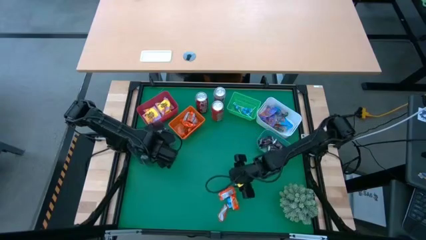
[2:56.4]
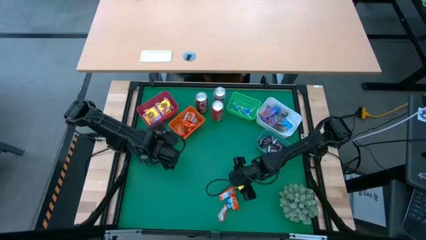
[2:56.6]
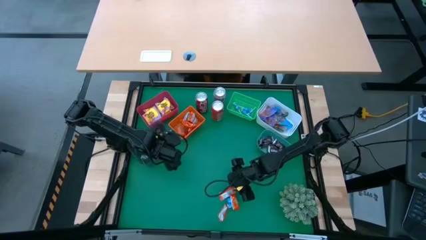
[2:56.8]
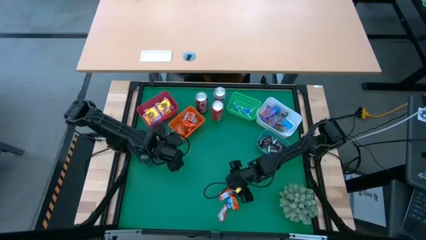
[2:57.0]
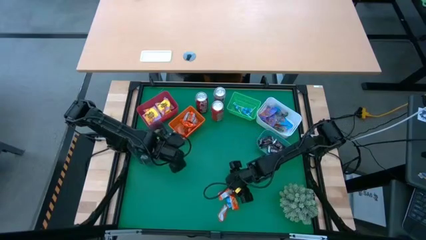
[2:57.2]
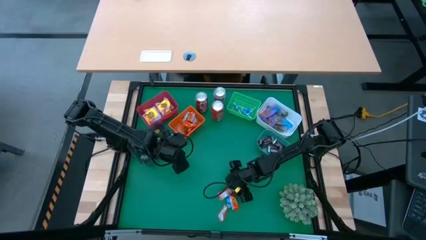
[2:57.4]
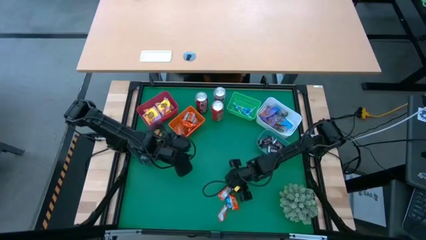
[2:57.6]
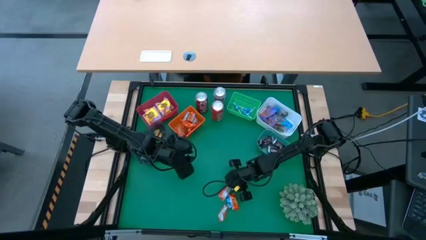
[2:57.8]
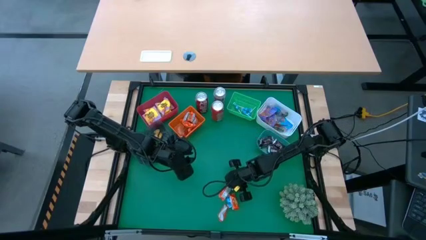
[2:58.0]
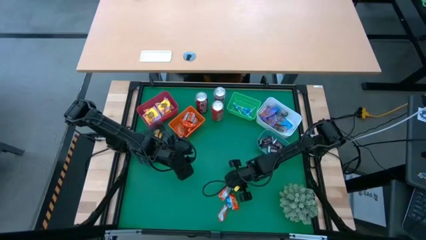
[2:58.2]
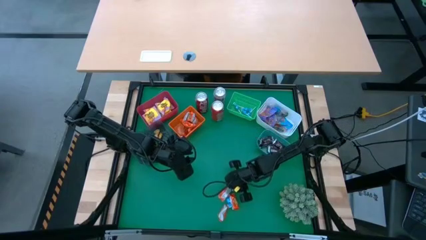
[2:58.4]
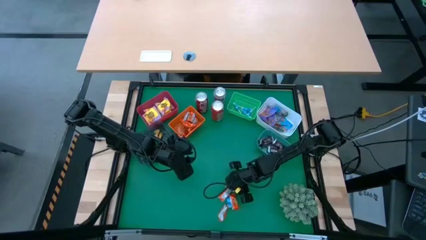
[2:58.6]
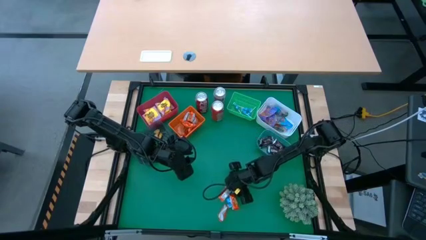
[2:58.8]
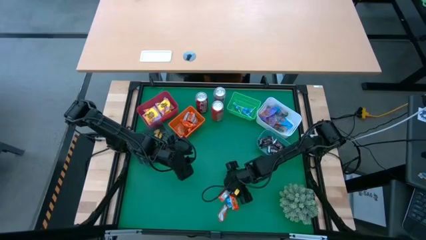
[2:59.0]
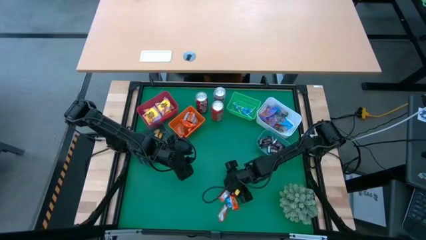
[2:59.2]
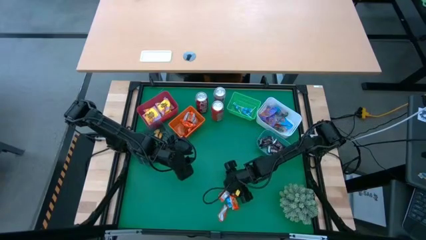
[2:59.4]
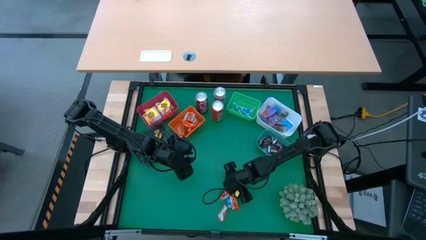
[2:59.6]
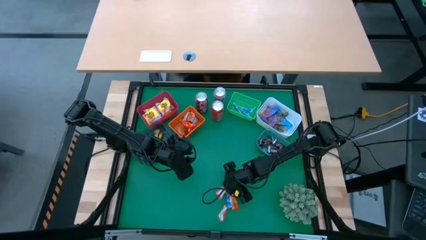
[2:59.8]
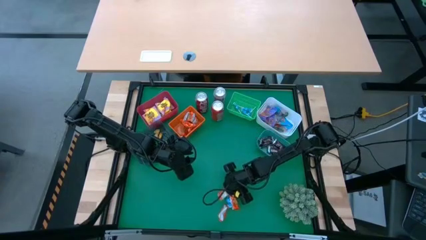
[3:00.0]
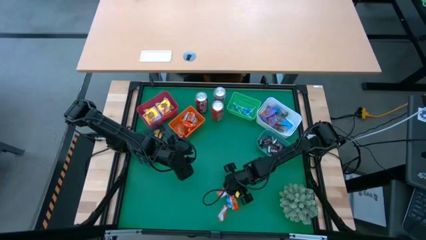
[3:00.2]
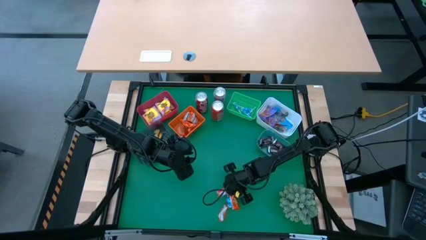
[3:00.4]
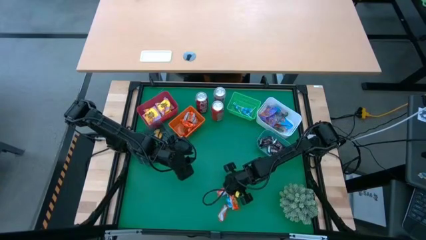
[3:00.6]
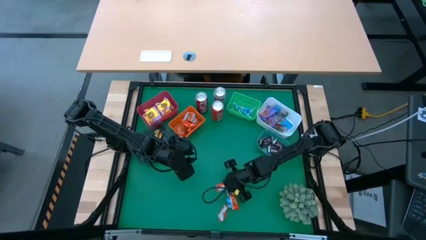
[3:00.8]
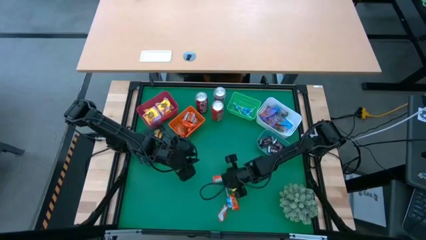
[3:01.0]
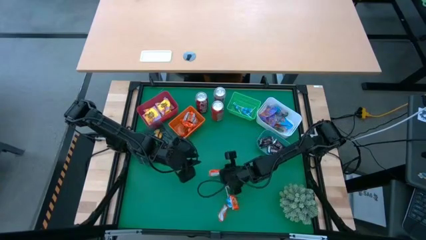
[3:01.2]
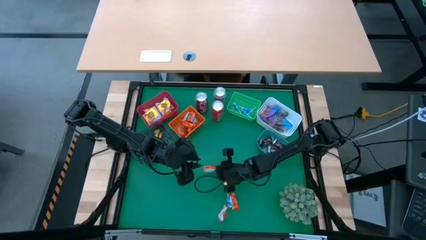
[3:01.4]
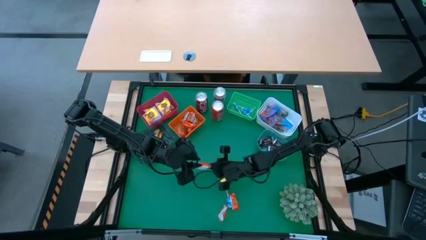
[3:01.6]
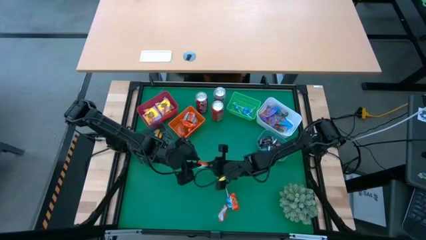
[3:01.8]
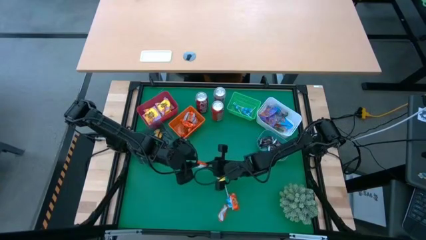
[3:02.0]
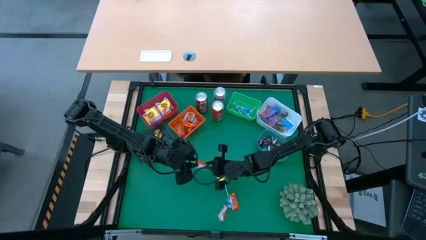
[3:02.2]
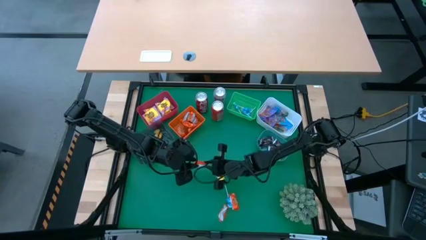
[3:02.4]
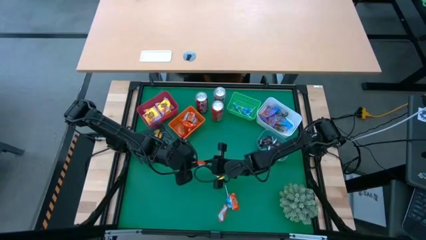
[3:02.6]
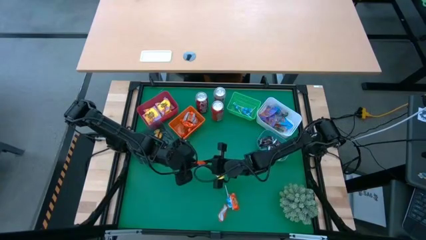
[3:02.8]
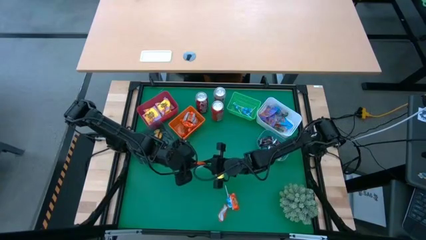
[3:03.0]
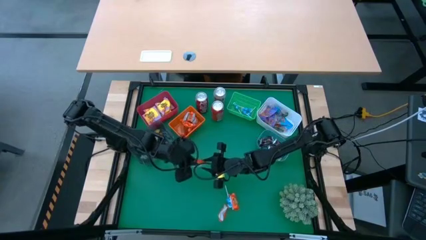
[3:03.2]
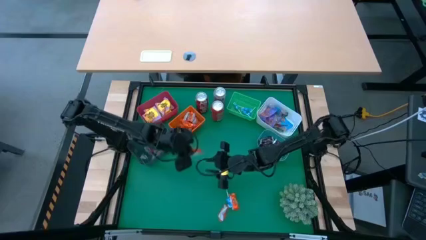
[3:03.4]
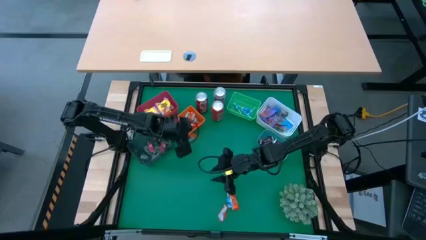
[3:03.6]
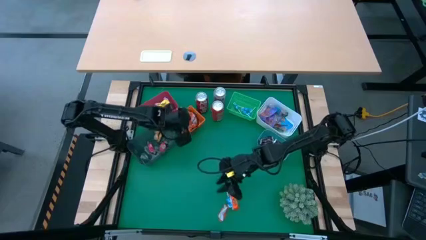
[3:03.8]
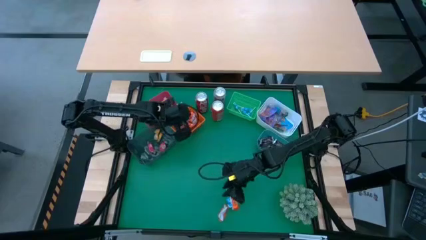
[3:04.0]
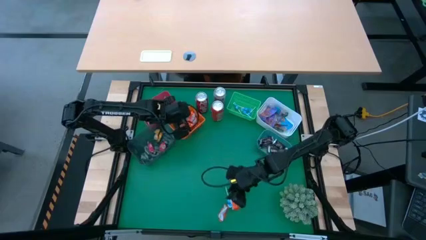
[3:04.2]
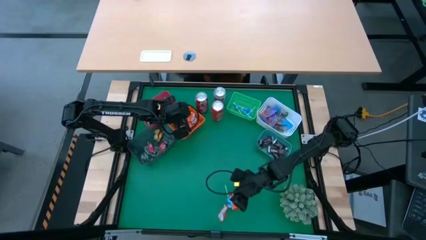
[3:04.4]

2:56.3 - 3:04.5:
Task: Sort candy
Put the orange chocolate into the orange bin

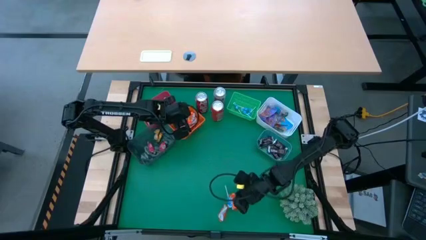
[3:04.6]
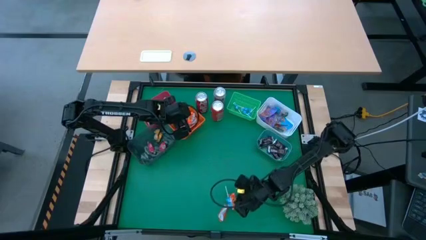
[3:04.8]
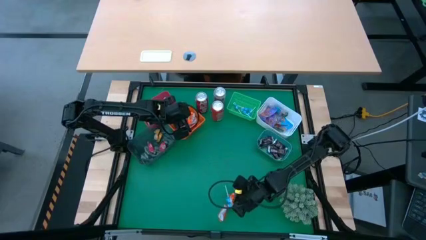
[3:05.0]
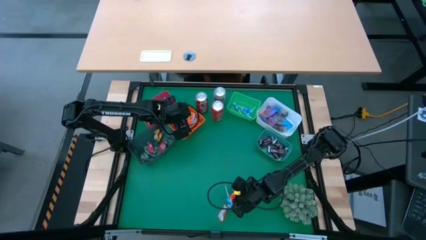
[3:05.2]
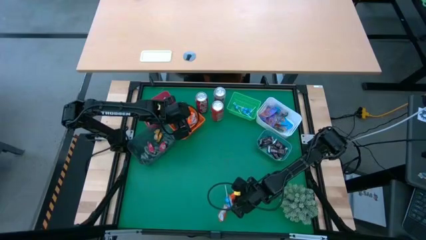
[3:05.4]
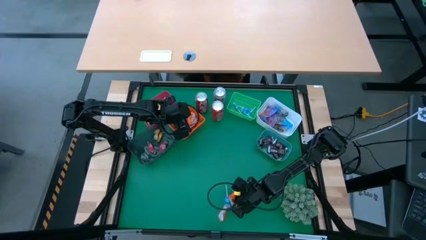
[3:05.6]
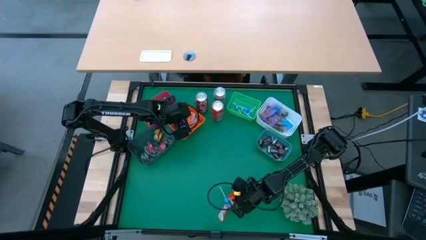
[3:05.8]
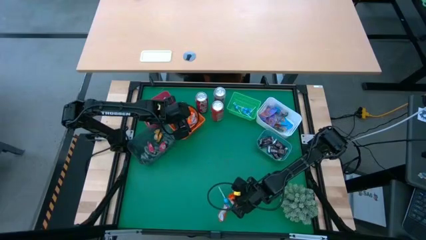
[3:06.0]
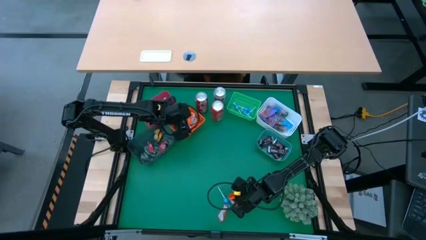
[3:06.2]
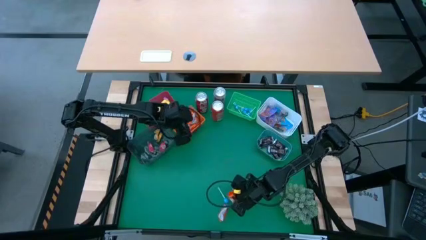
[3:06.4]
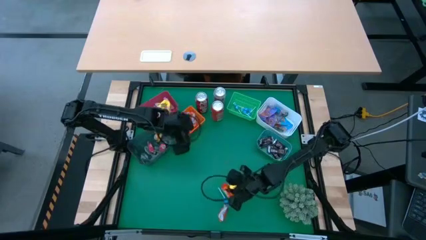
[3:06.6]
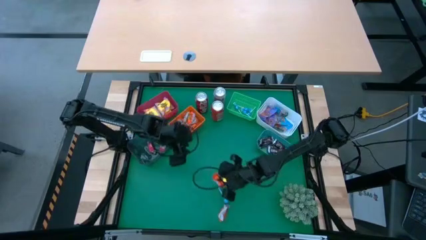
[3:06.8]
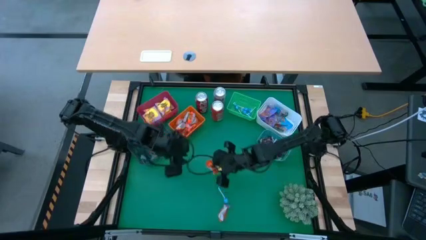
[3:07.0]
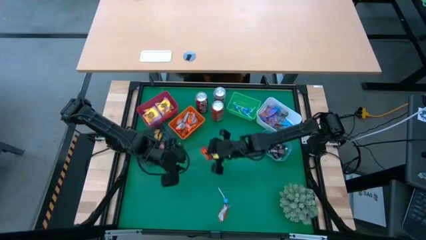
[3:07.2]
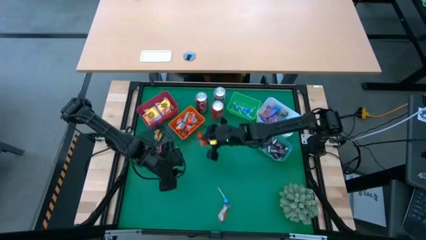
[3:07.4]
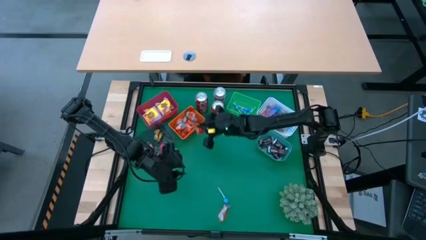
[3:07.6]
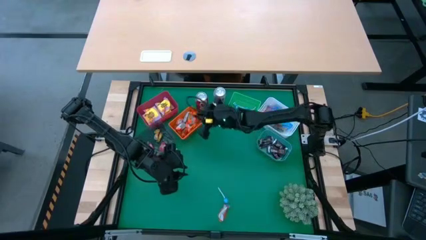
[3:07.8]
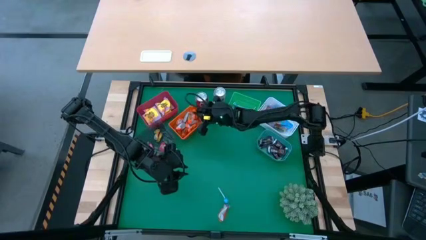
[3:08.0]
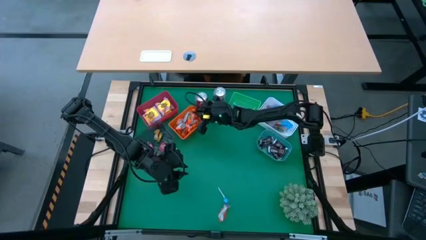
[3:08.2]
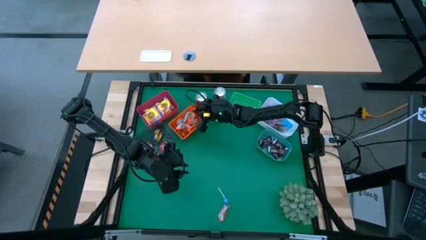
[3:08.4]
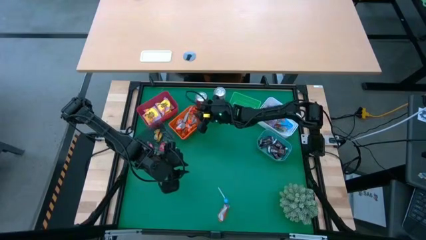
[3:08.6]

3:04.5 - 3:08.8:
Put the orange chocolate into the orange bin

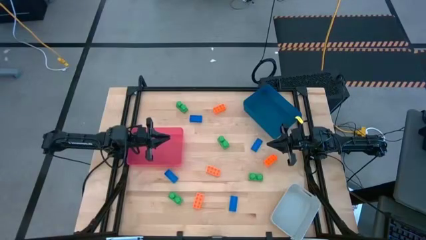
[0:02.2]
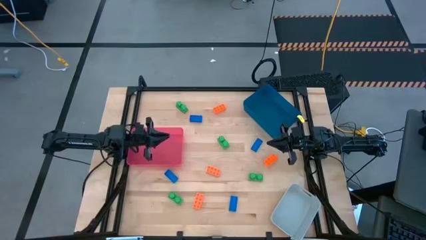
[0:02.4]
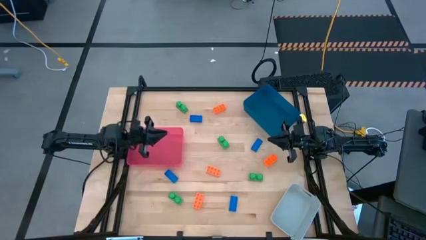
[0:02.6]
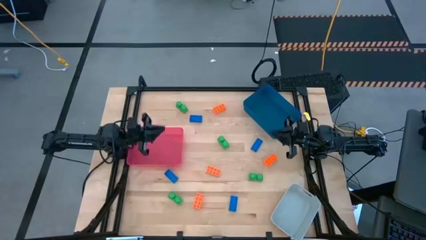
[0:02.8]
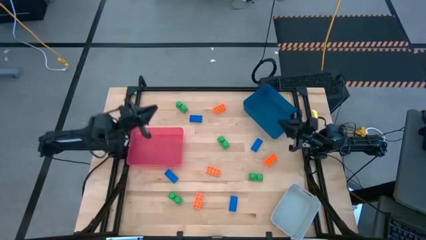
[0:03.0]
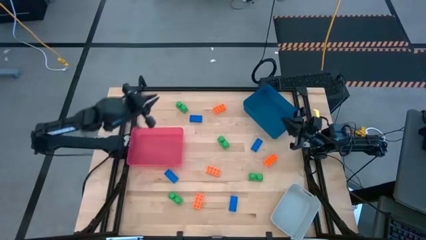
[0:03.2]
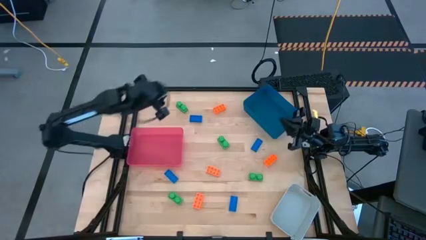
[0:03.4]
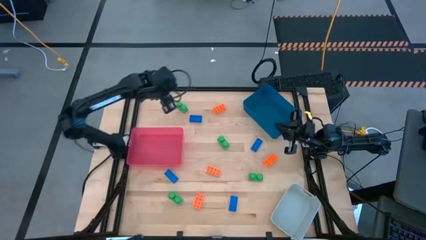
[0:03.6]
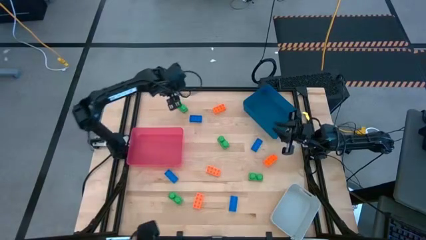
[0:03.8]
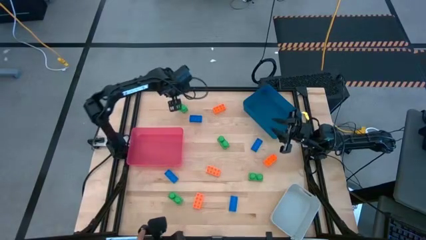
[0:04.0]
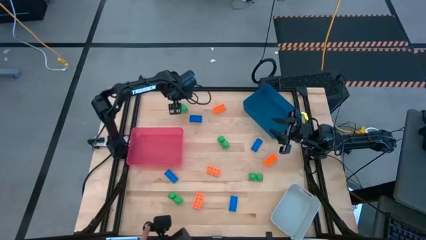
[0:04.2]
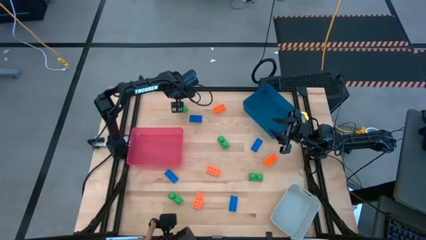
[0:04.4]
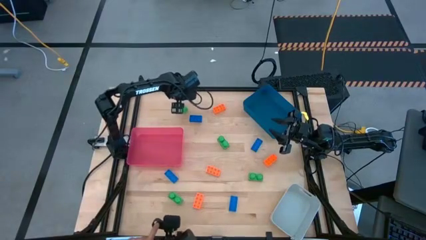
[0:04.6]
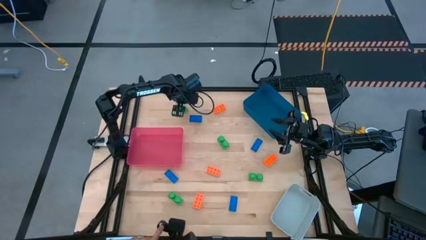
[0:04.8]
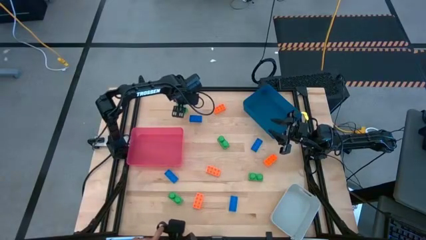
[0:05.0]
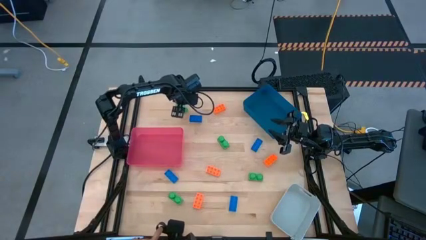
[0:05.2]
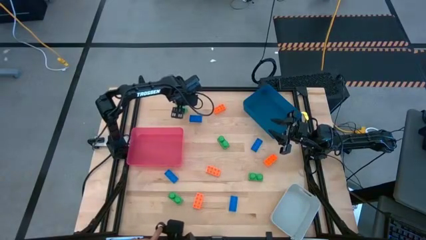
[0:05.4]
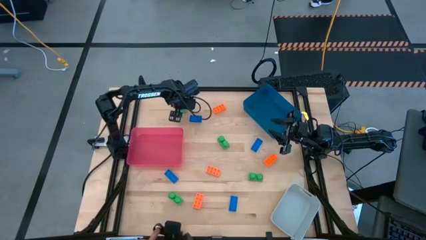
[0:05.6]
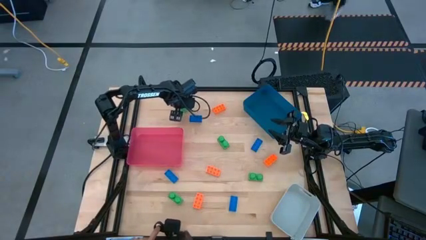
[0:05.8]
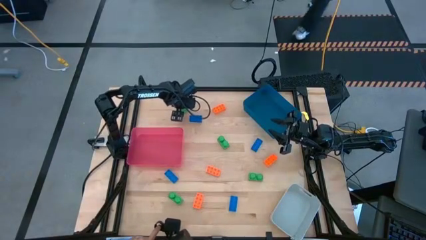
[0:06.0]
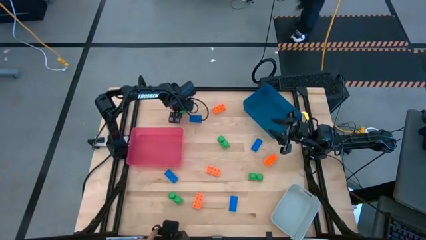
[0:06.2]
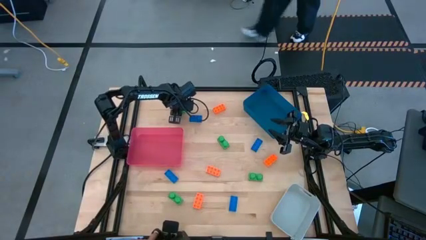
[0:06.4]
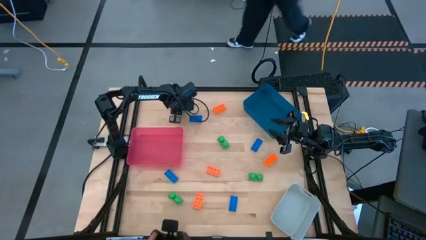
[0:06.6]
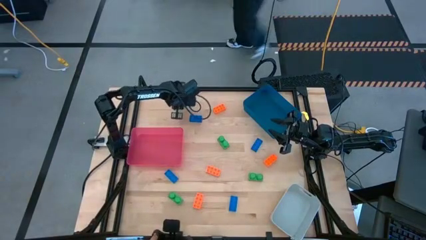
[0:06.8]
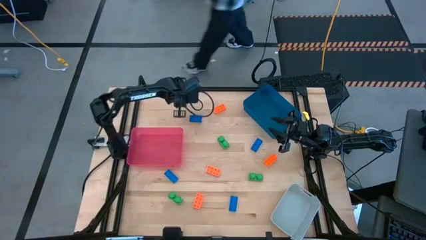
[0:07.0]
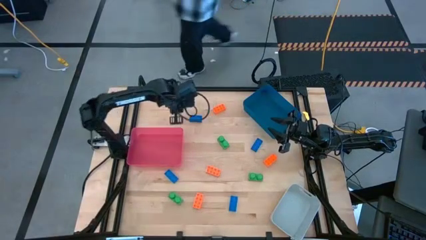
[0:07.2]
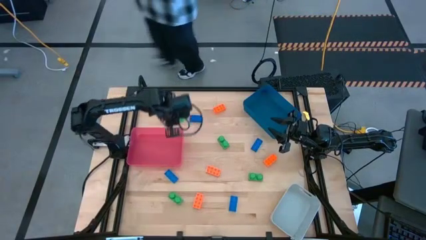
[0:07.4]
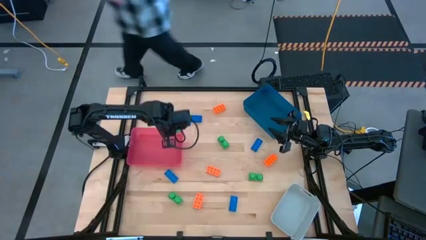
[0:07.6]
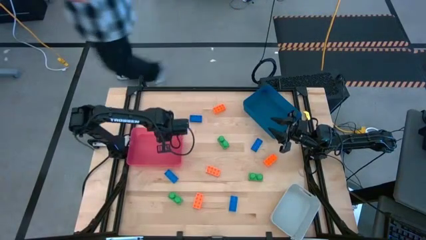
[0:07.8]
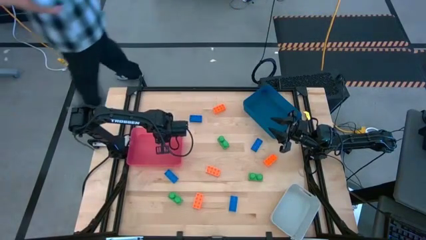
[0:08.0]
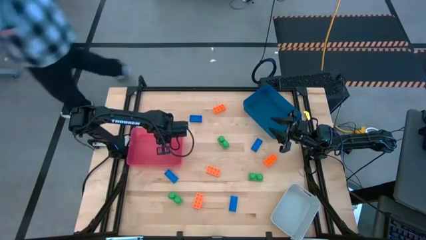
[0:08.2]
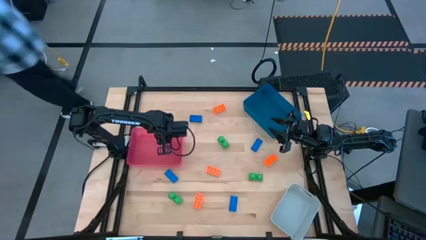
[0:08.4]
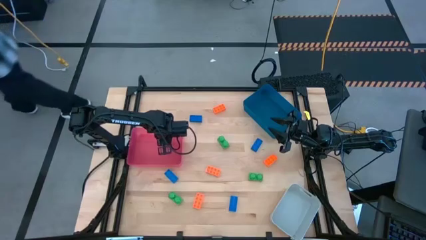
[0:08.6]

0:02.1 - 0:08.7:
Task: Sort & place blocks by color
Put the green game piece into the red bin
